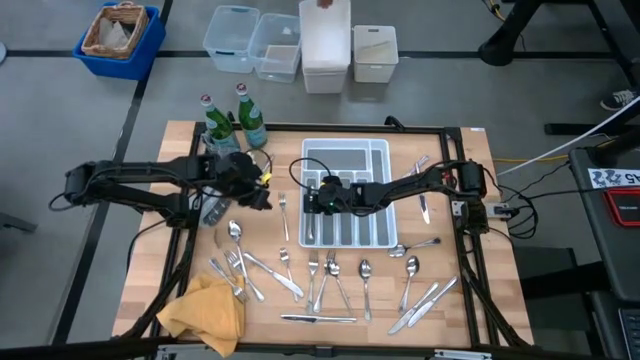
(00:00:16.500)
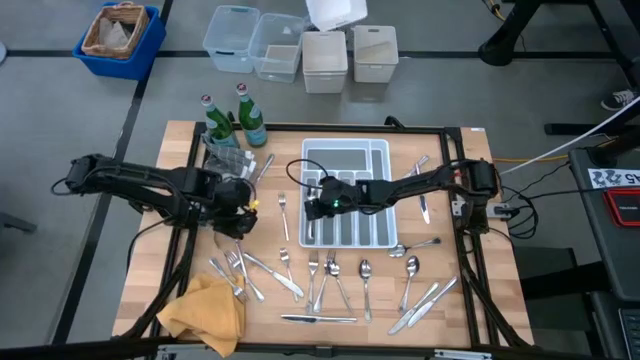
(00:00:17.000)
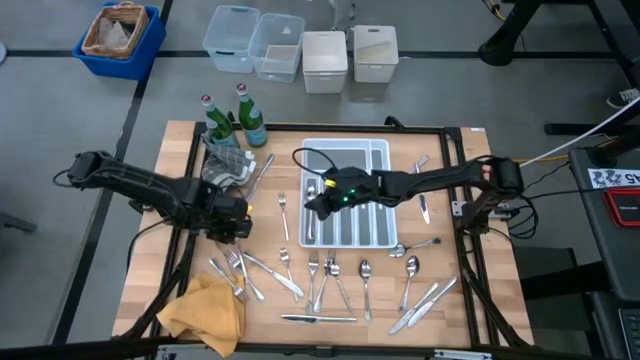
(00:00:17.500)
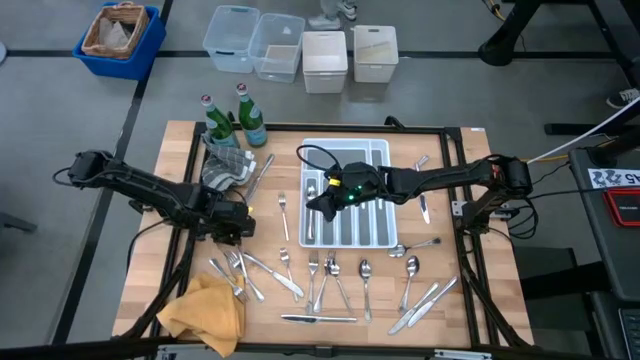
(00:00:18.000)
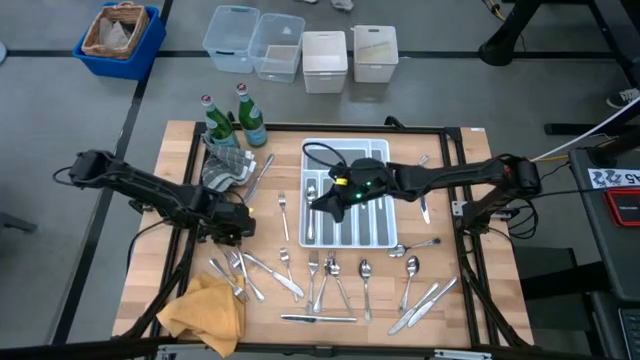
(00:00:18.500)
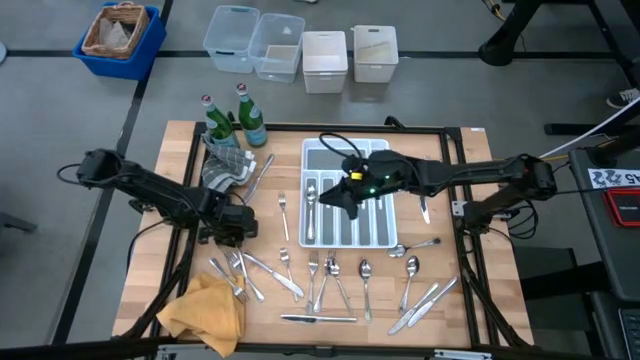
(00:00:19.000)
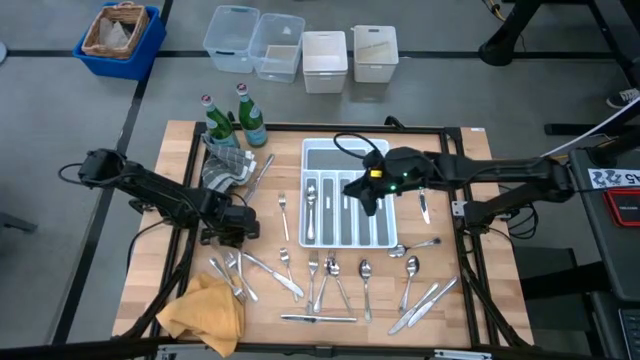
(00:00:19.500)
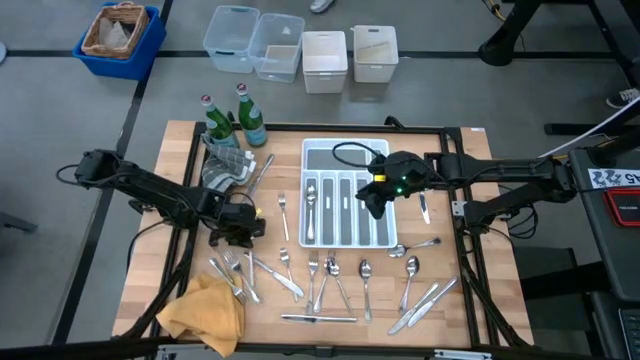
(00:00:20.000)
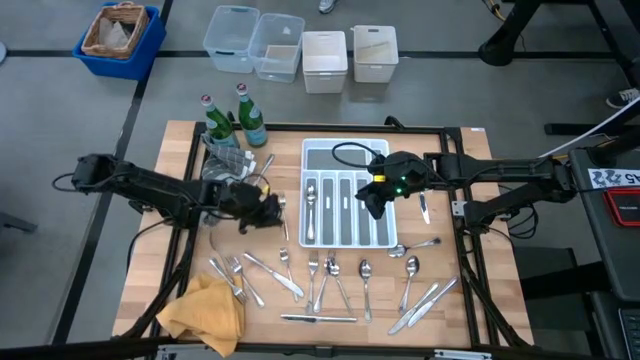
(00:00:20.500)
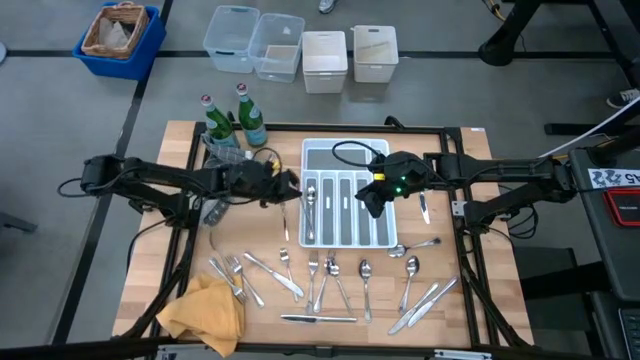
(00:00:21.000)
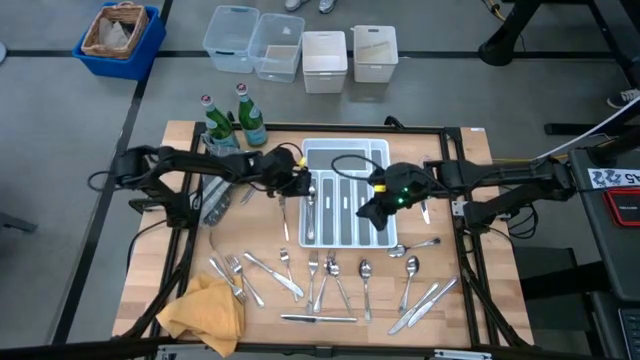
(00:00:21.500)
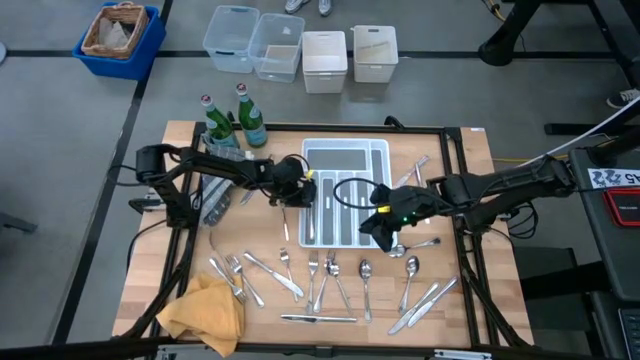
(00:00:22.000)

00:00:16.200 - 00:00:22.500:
Task: Sort silverware
Put the silver spoon into the silverware tray

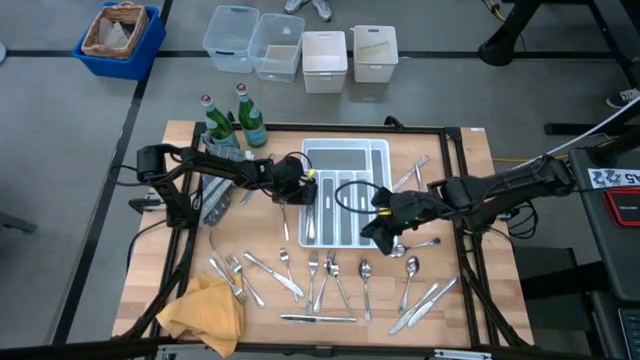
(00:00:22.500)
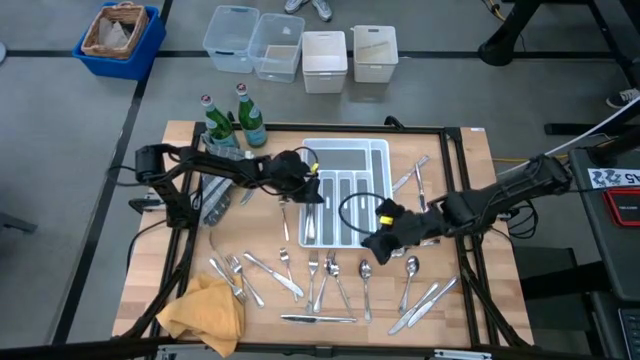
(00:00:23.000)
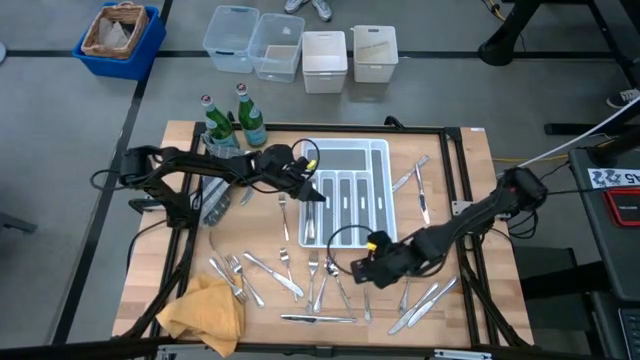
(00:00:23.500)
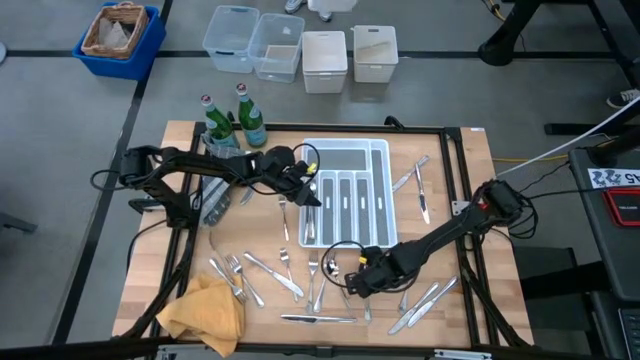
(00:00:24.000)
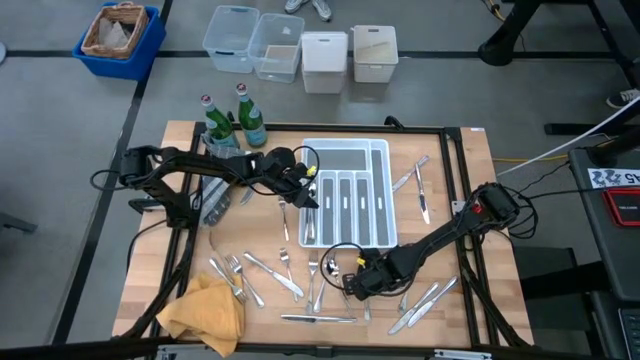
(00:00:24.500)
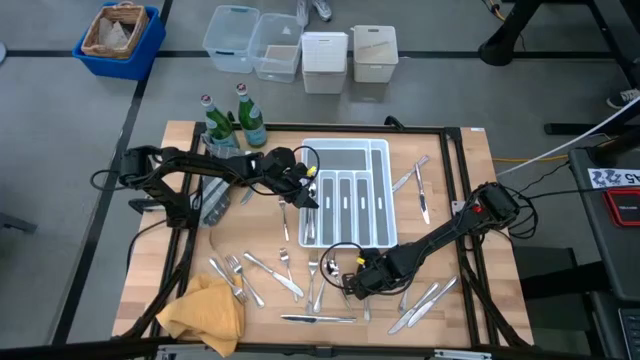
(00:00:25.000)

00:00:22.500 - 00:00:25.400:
Put the silver spoon into the silverware tray

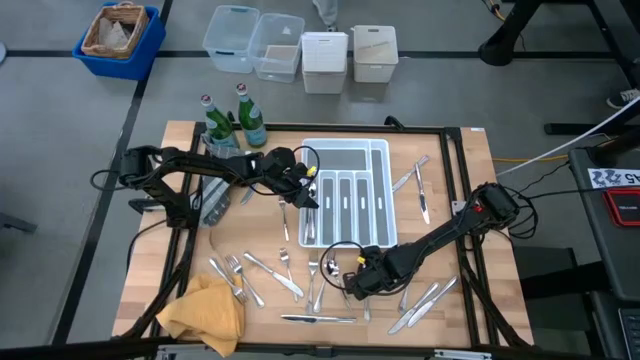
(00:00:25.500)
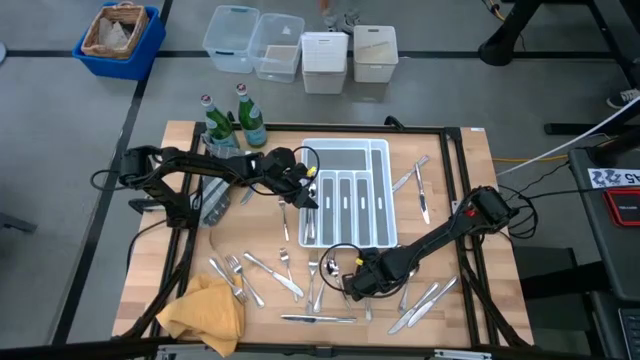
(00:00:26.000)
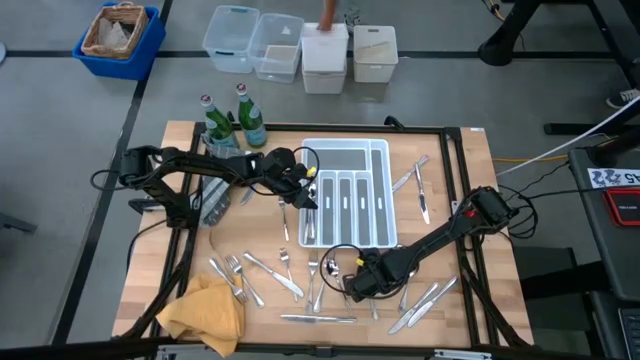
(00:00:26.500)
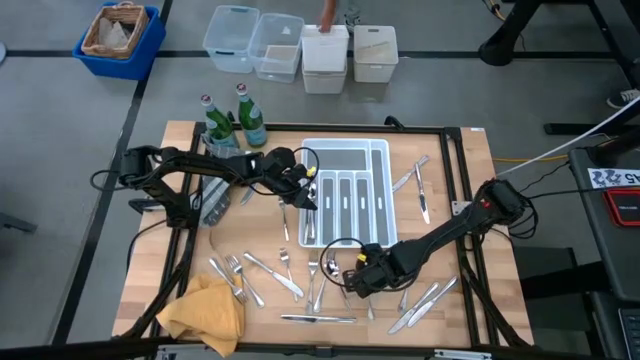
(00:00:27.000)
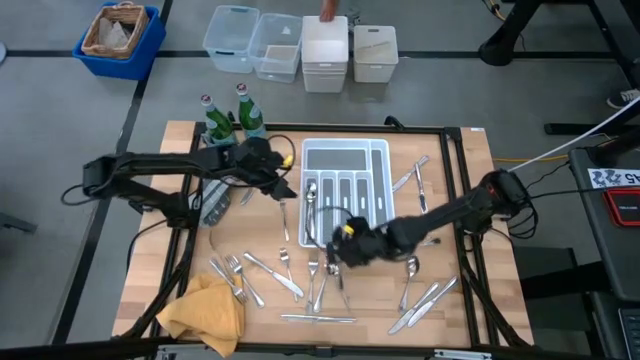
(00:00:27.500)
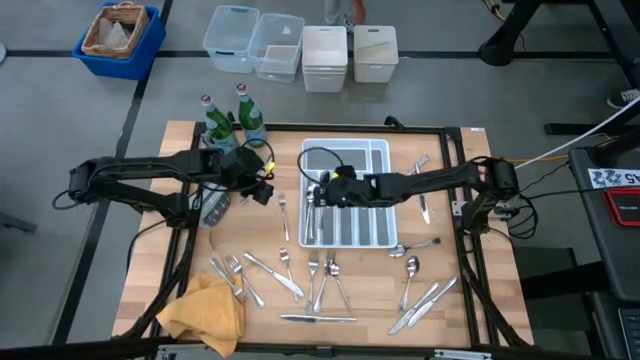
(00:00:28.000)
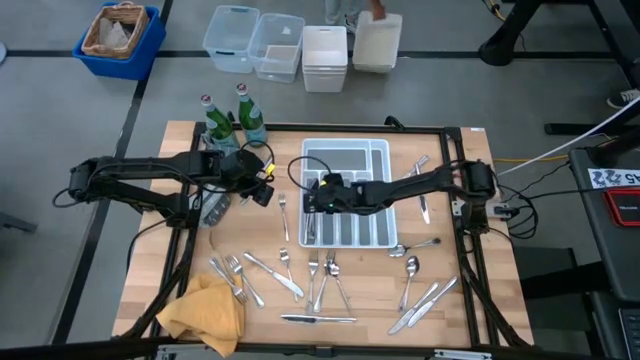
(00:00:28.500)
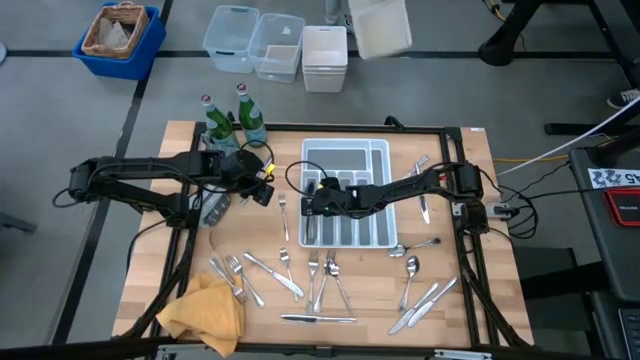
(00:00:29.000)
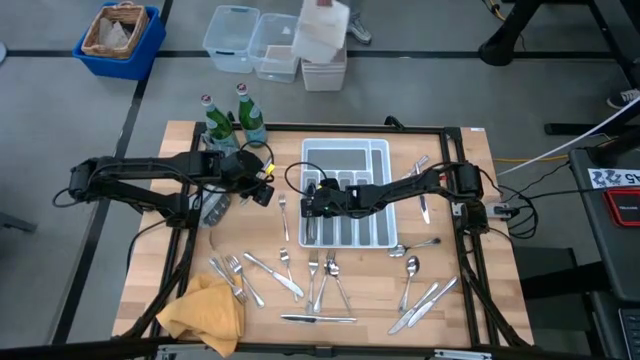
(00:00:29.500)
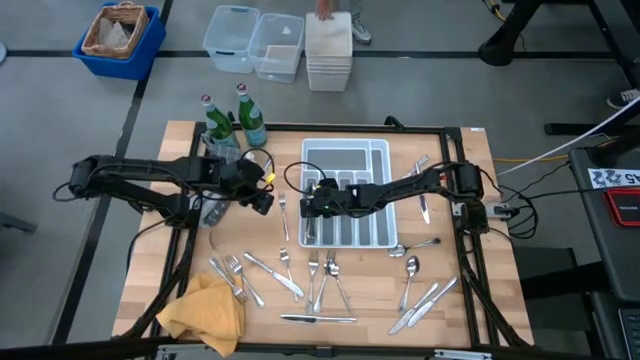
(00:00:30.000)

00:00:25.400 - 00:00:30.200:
Put the silver spoon into the silverware tray

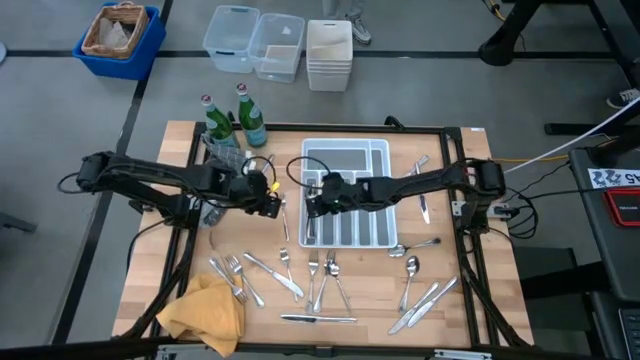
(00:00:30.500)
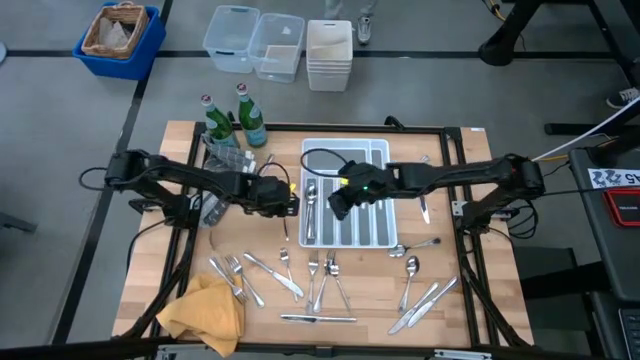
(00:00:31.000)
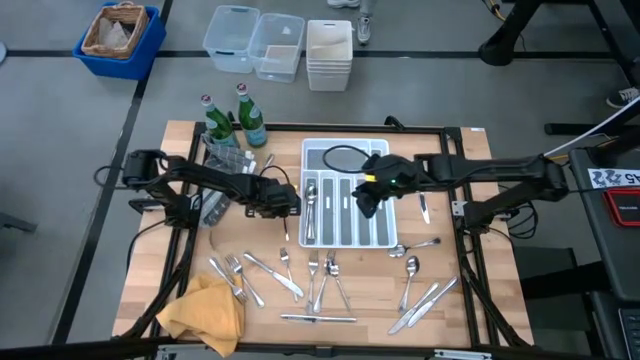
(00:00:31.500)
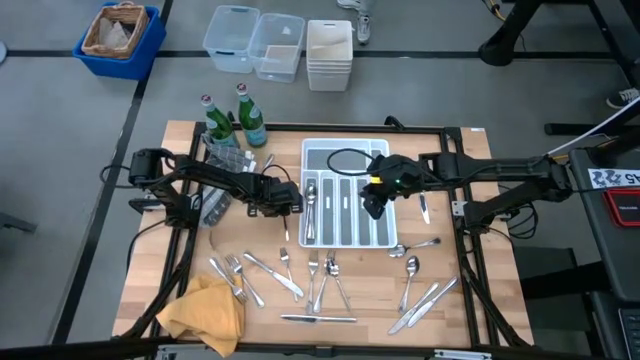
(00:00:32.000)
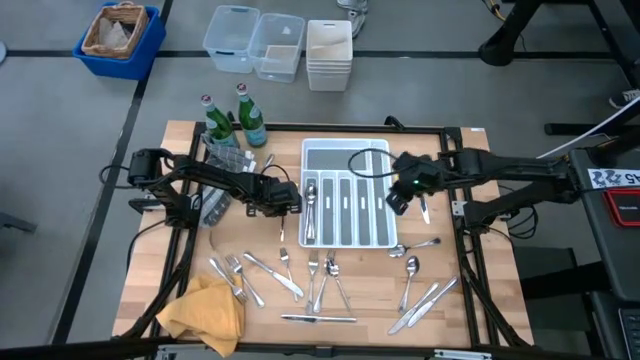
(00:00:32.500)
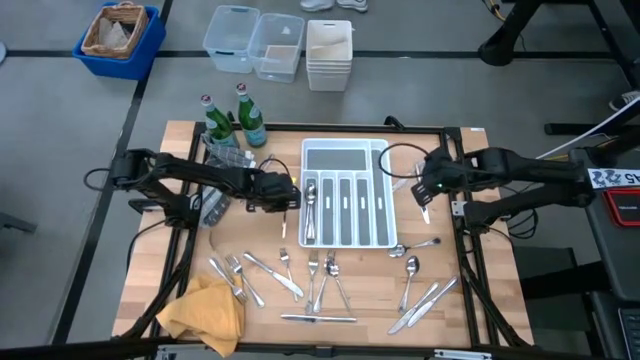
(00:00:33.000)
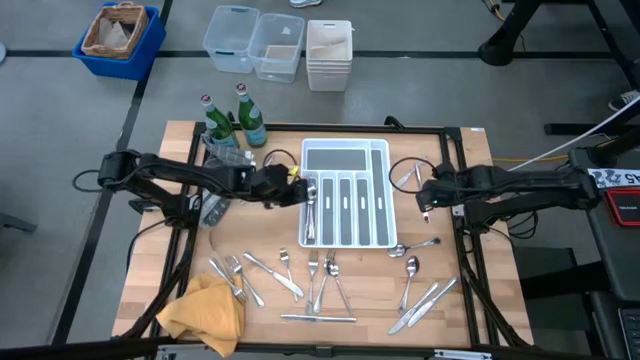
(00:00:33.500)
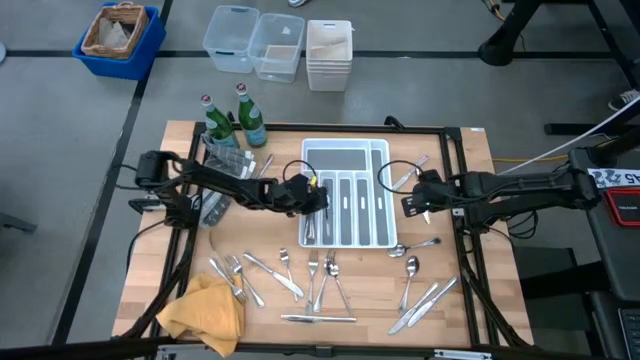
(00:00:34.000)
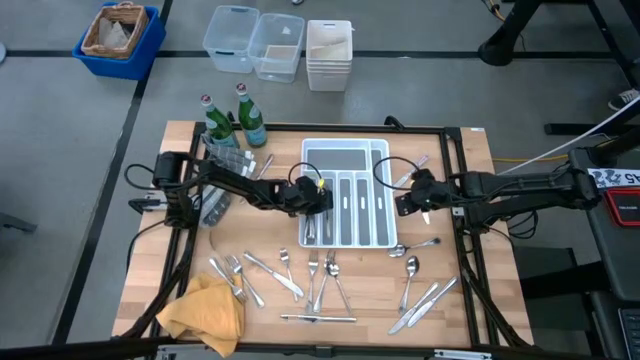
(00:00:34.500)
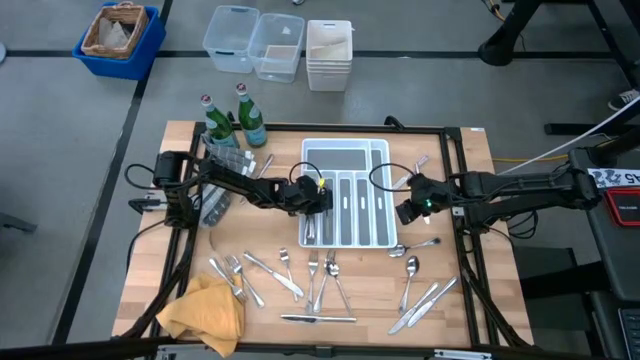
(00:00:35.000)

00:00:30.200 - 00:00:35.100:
Put the silver fork into the silverware tray

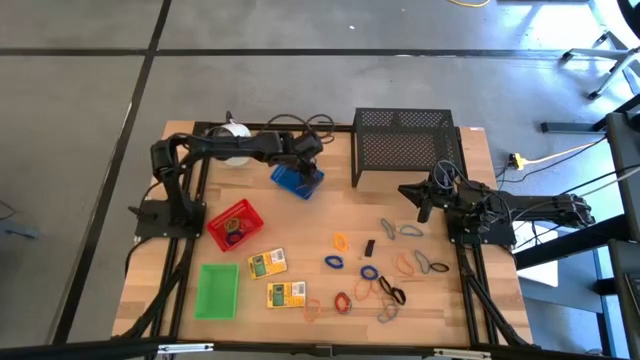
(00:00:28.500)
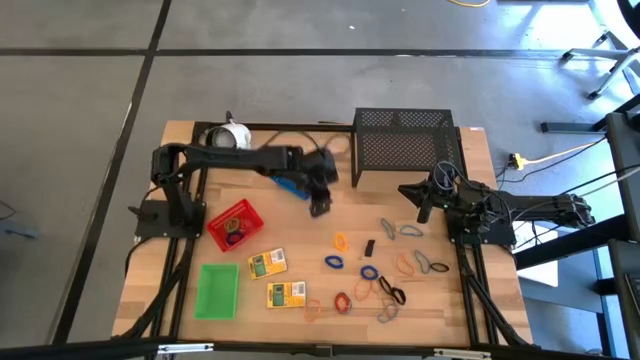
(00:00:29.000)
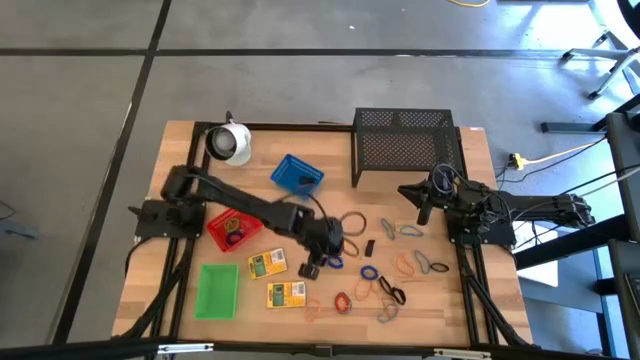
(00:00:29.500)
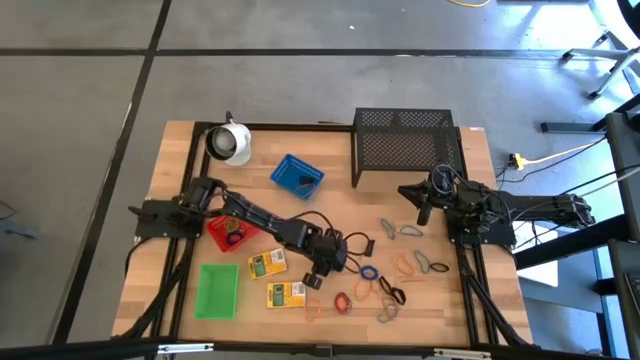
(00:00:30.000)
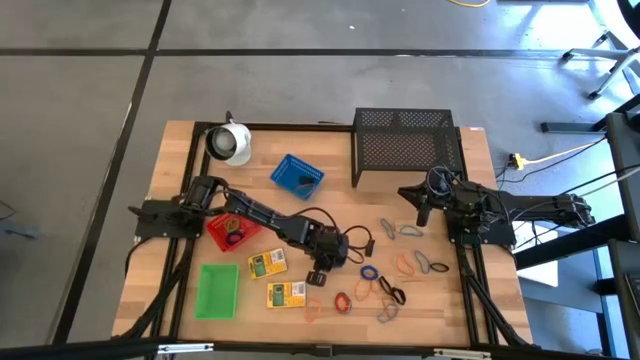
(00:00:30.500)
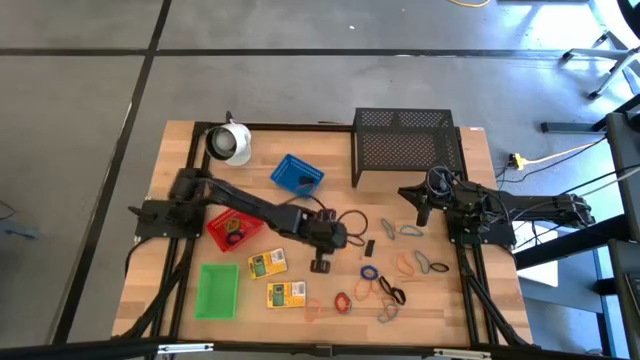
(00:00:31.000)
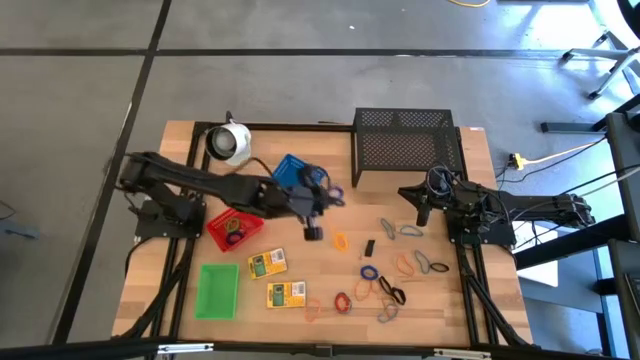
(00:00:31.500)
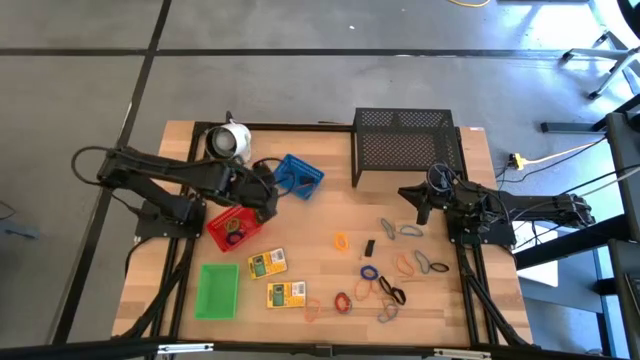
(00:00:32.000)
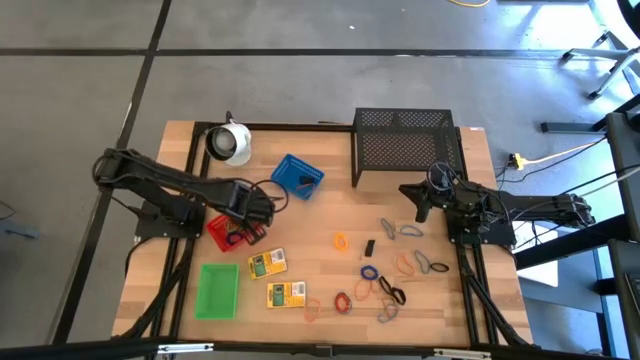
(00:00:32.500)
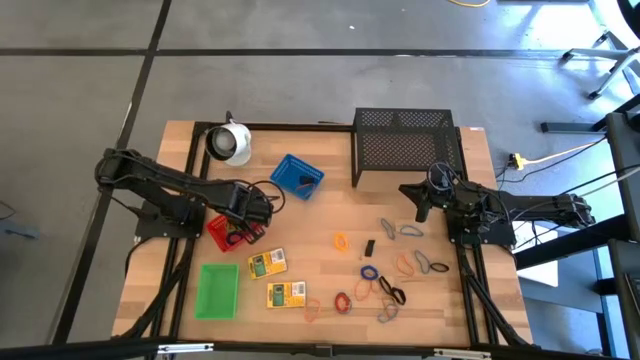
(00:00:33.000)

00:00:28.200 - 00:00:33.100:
Task: Pick & Place Office Desk Supplies
Put the blue spring keychain into the red bin
